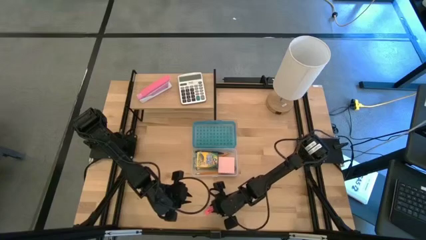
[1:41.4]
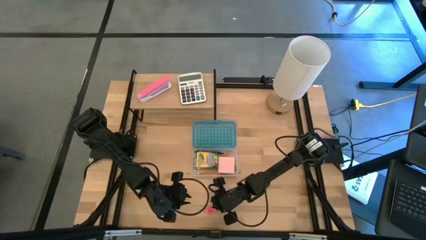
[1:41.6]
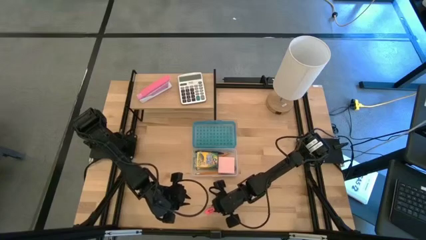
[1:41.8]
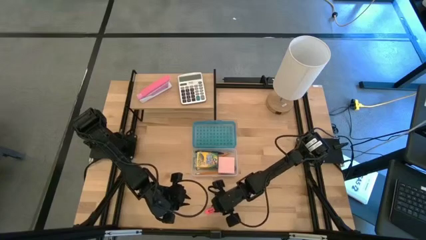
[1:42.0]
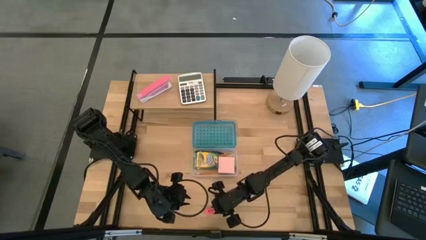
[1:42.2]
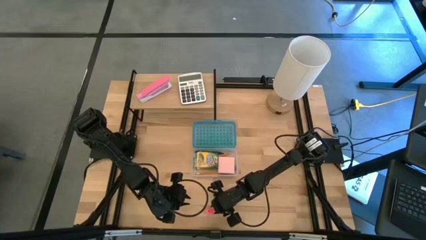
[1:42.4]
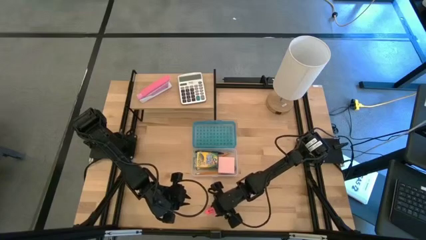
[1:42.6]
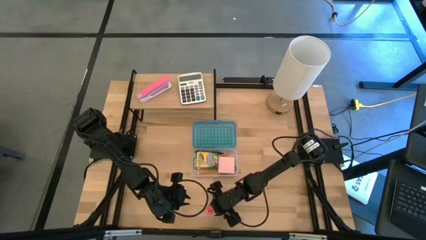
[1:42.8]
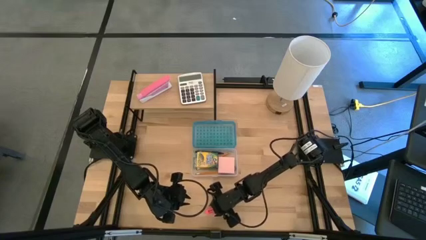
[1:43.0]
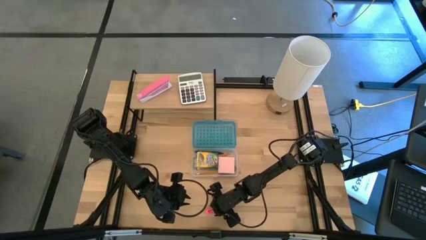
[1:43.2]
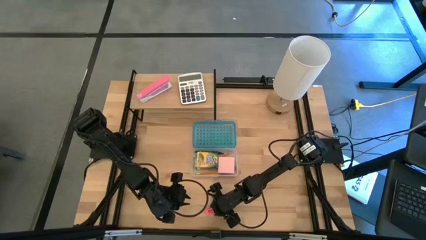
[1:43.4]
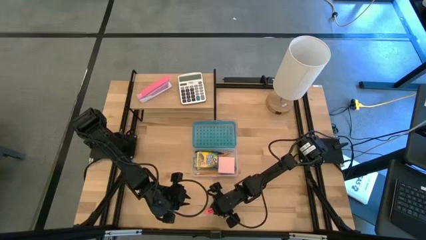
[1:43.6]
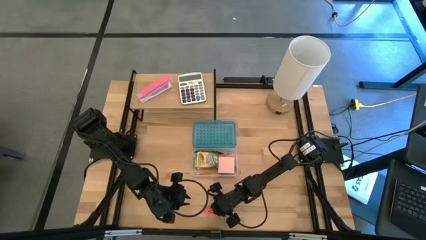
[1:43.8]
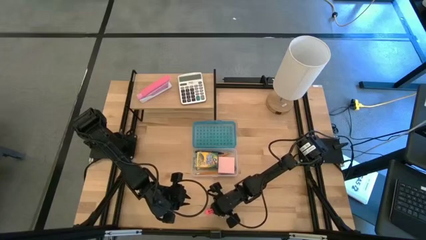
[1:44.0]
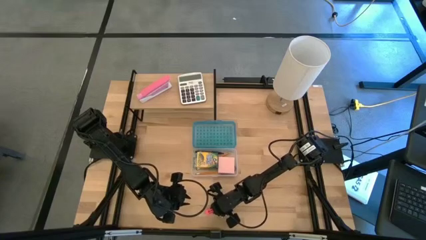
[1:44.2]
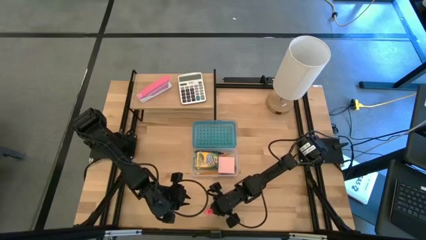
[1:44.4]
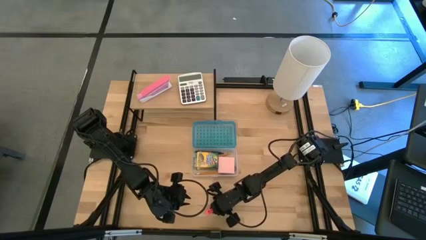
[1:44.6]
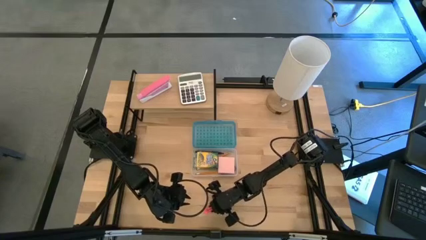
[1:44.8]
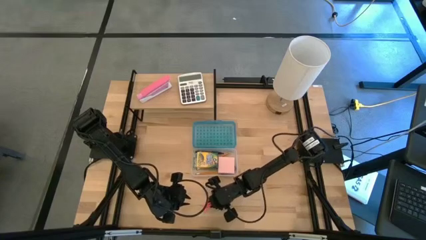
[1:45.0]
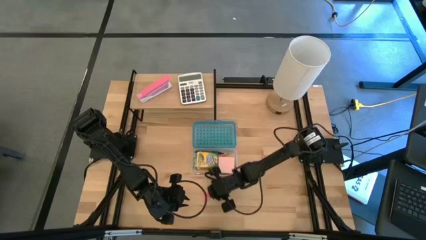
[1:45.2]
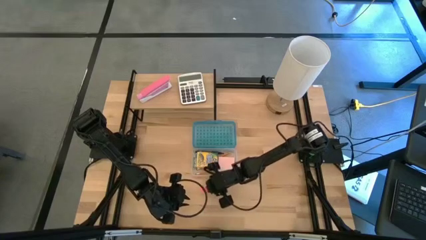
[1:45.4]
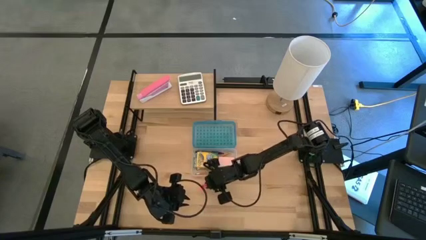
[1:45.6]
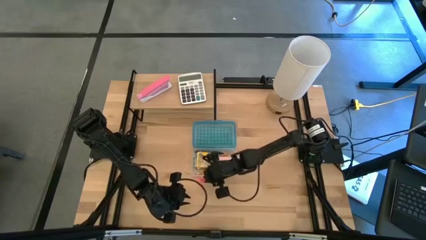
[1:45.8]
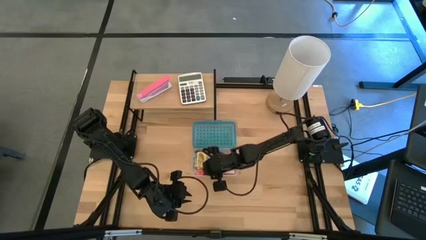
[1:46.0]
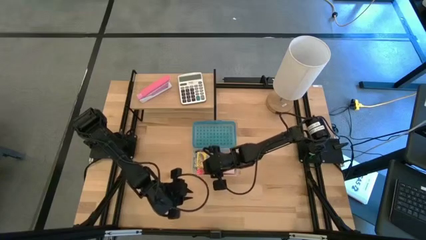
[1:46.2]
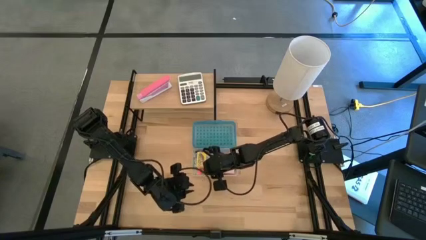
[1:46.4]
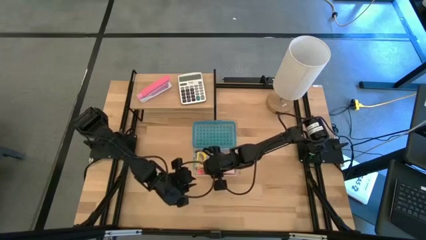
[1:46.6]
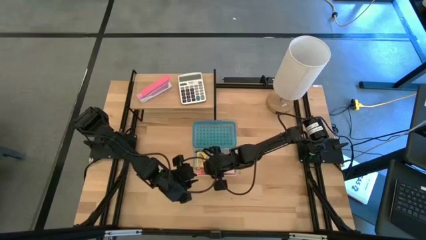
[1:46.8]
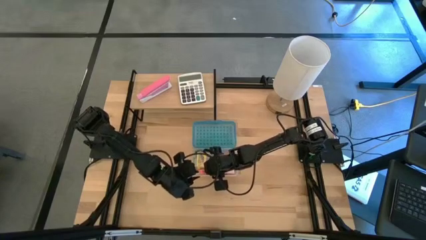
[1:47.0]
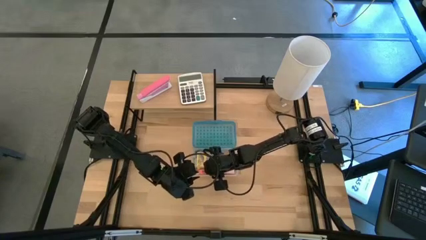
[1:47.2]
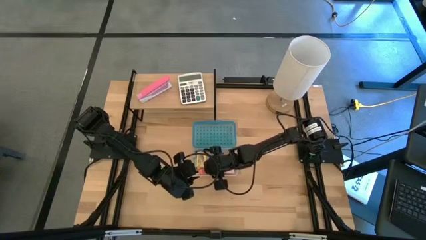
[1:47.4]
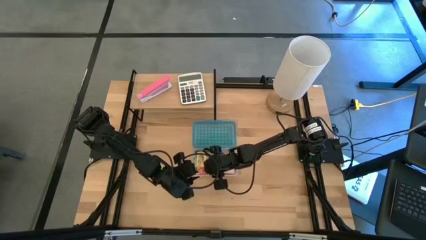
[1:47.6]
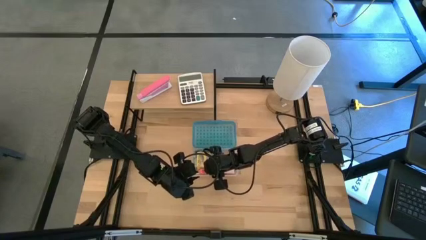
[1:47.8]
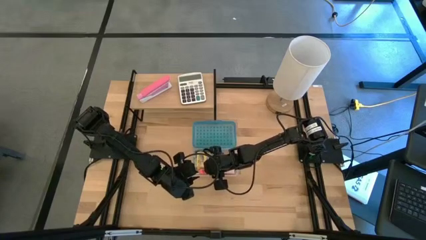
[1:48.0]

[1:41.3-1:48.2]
Task: Pack school essentials
Put the pink eraser into the blue supply box

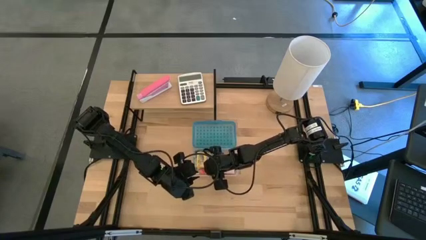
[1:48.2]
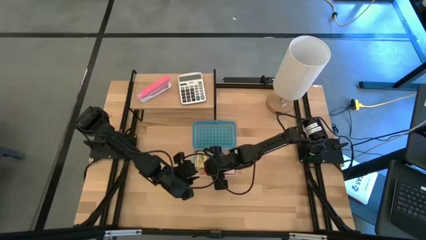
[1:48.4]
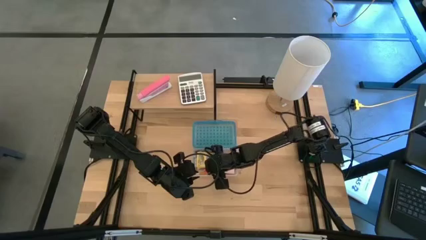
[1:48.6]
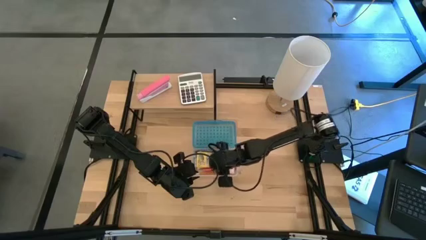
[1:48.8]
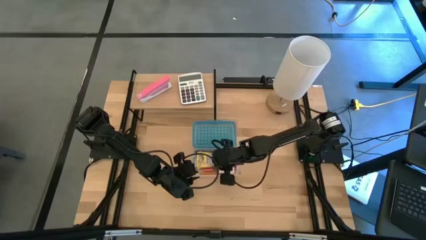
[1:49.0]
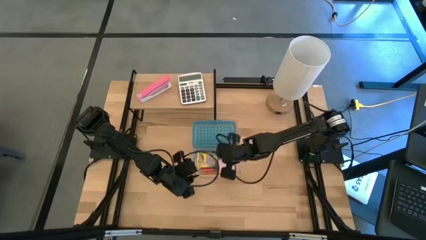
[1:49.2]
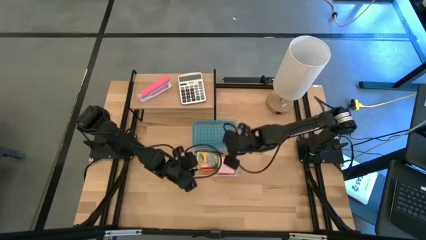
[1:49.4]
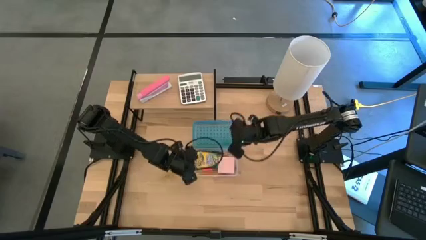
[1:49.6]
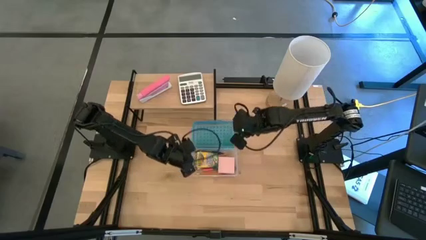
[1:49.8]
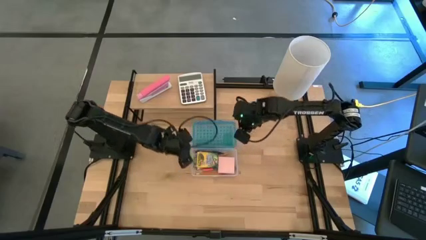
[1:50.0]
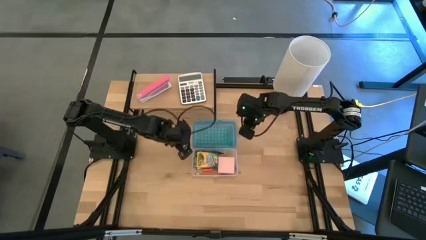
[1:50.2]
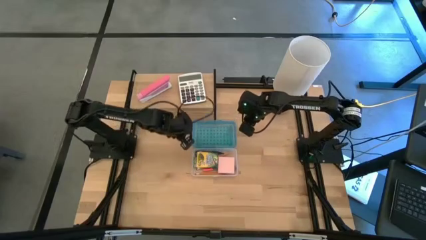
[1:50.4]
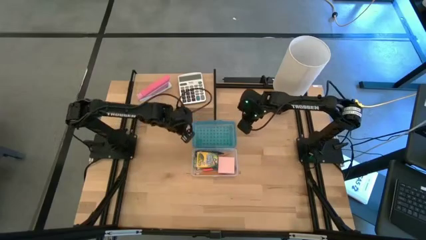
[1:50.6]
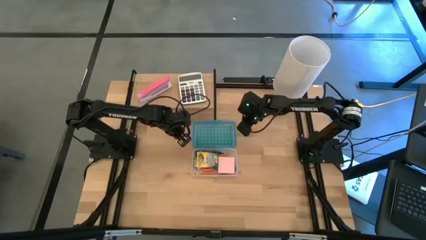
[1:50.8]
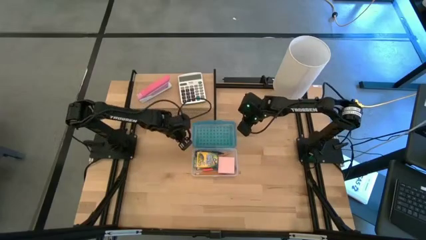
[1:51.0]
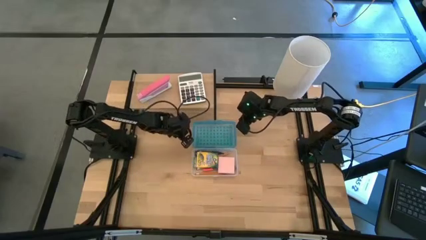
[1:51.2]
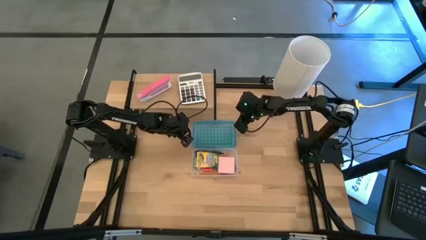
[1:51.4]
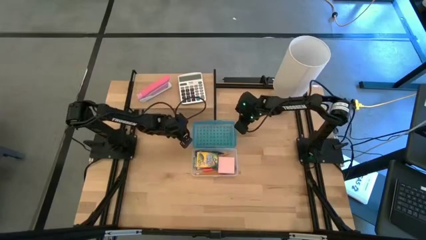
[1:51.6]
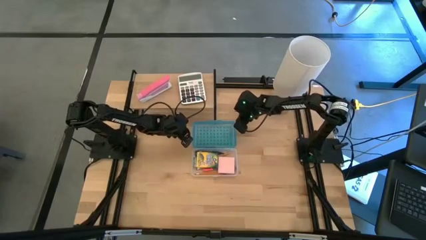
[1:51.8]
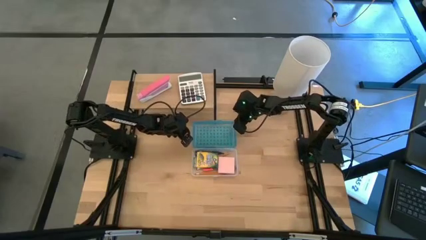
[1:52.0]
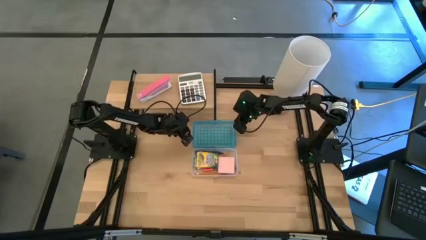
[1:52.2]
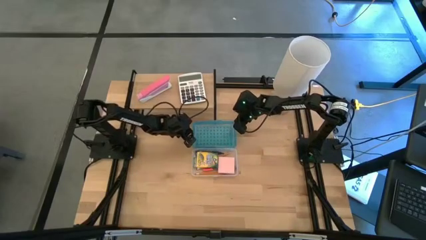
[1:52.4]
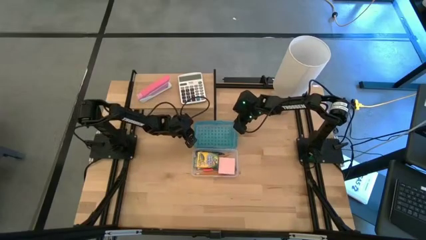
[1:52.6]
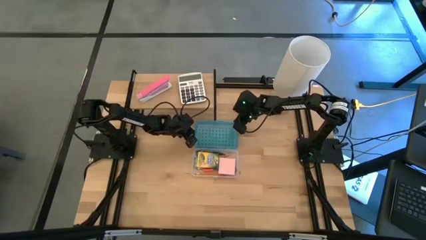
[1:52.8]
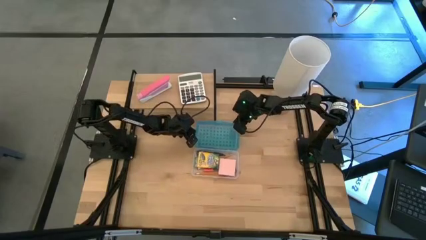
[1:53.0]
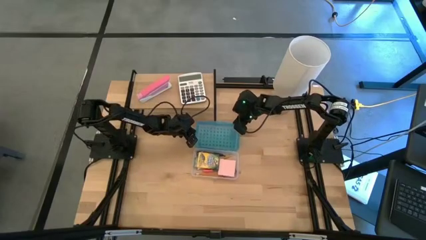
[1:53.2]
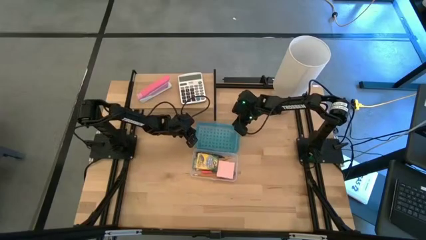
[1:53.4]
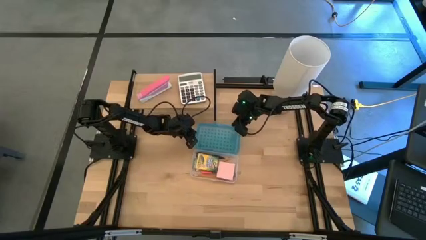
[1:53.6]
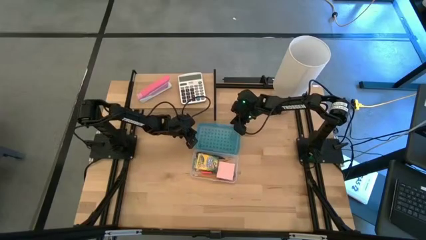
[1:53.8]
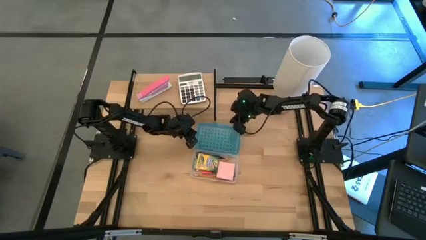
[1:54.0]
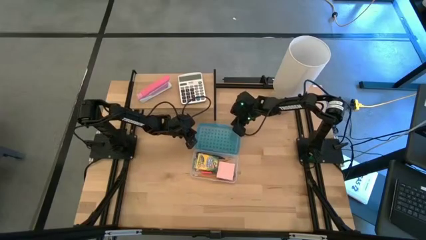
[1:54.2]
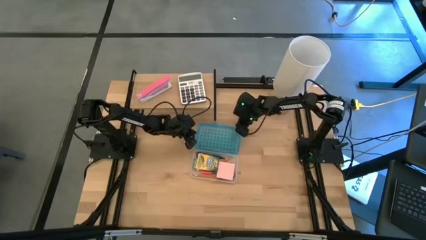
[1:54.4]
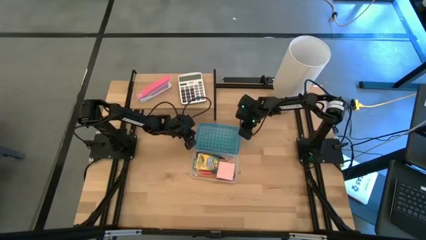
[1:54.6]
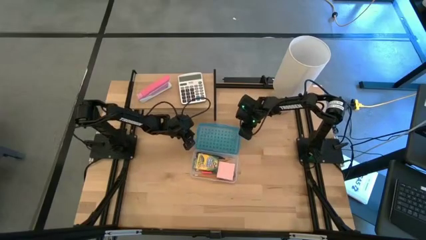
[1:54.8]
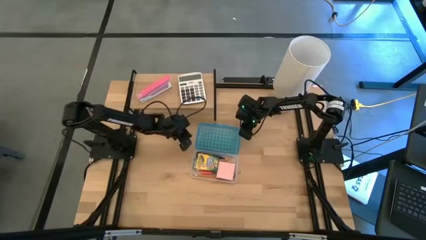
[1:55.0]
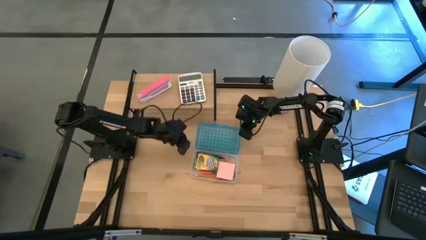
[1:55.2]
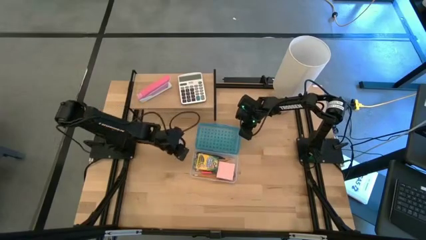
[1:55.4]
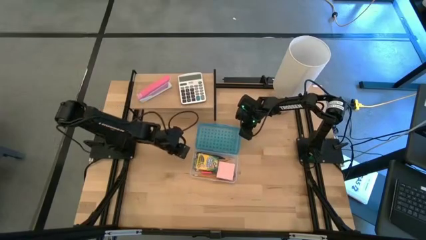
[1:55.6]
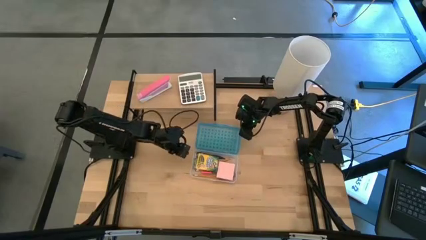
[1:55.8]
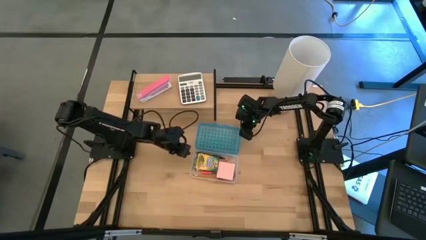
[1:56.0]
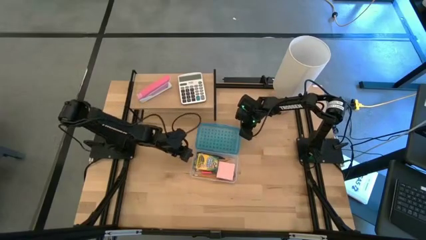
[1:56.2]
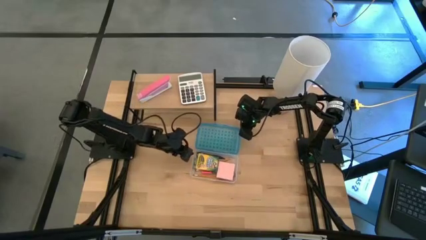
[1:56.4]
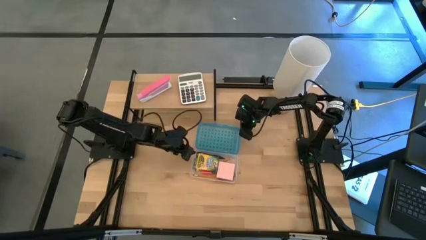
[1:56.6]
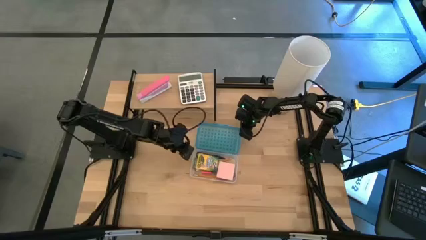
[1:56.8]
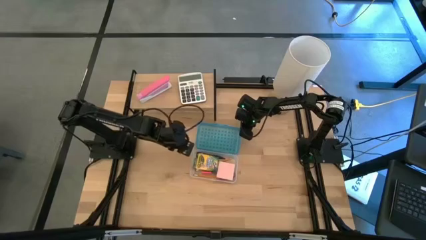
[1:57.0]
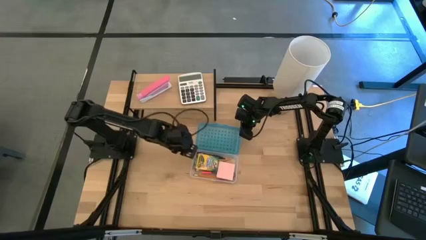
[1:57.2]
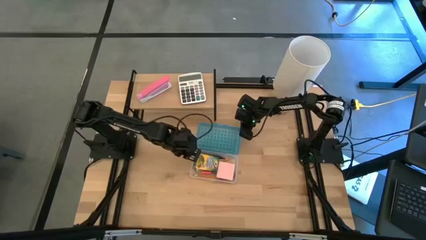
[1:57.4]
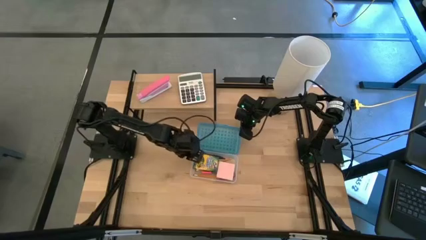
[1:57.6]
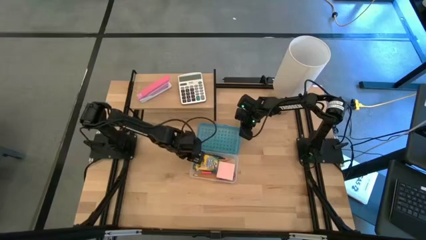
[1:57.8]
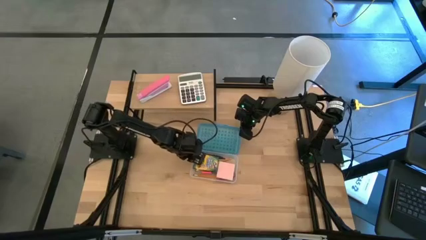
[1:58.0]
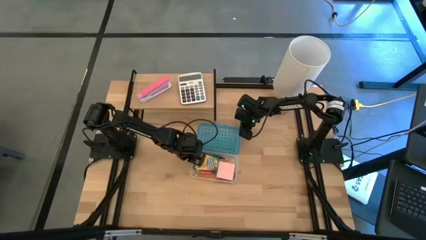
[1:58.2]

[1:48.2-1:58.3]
Close the blue supply box
